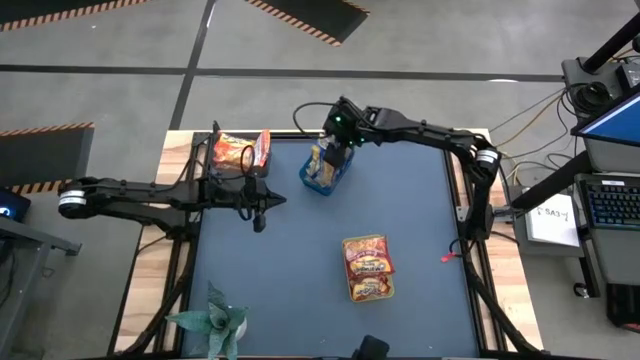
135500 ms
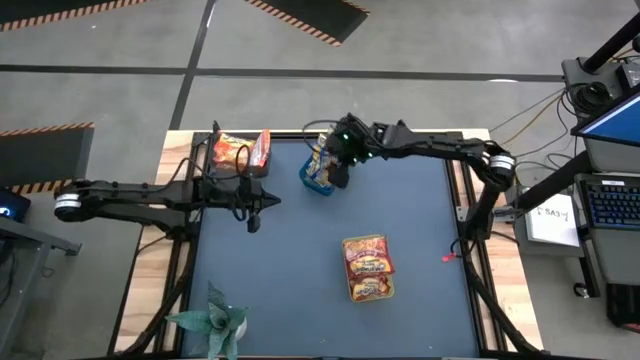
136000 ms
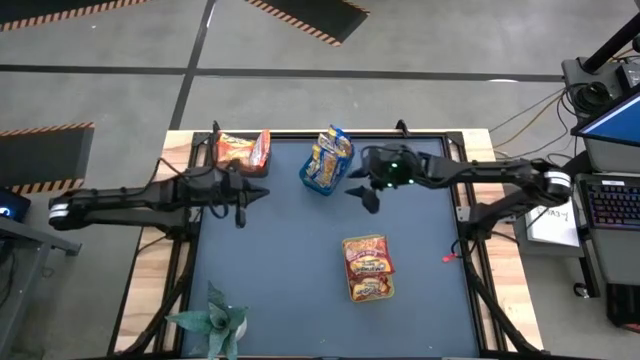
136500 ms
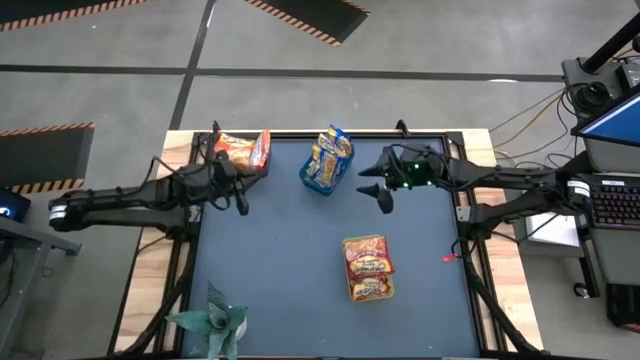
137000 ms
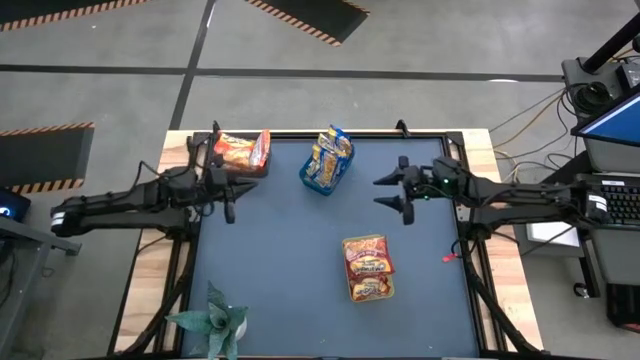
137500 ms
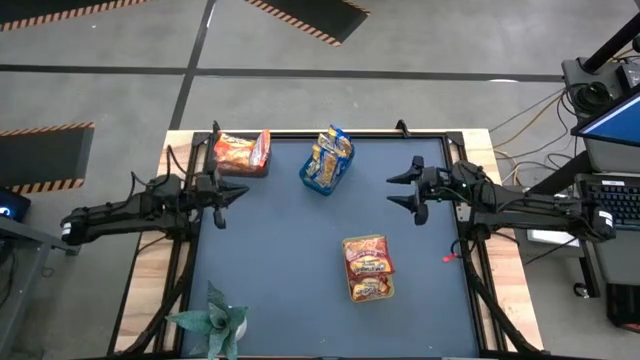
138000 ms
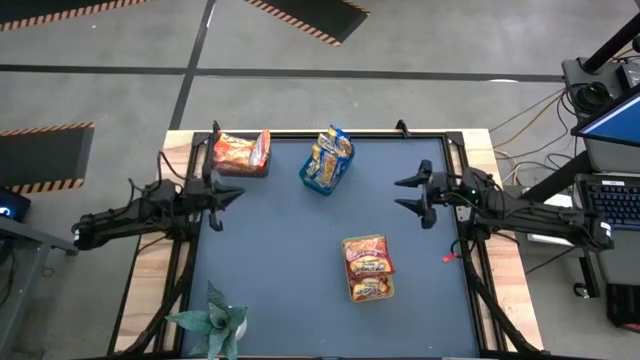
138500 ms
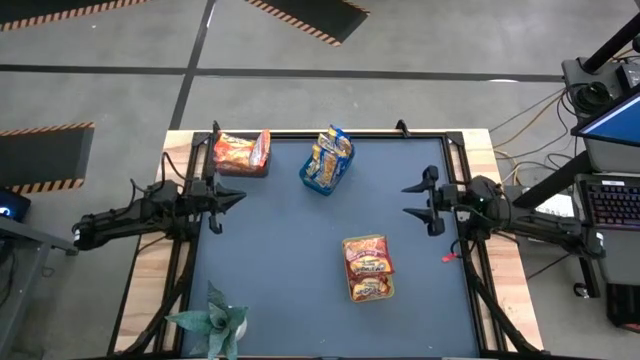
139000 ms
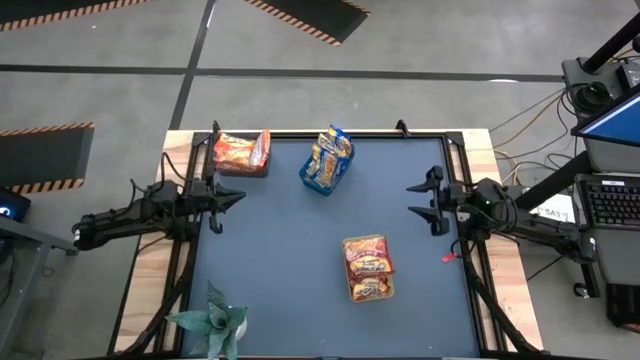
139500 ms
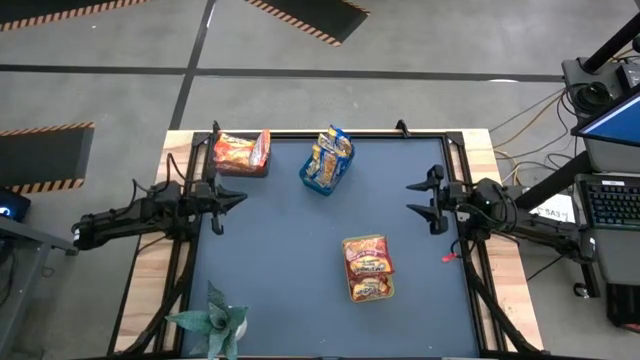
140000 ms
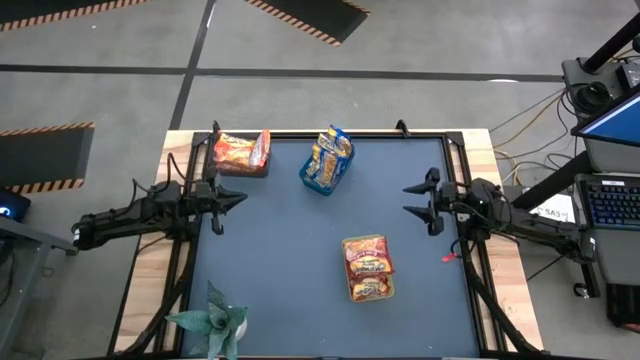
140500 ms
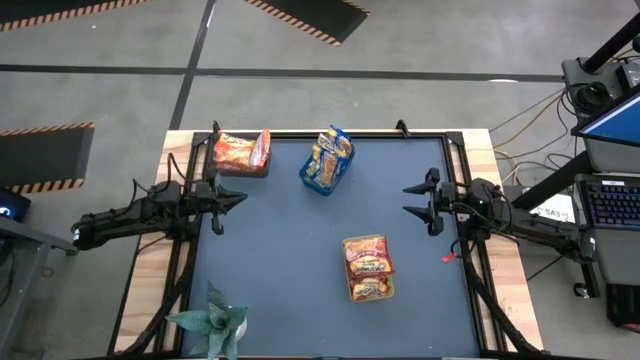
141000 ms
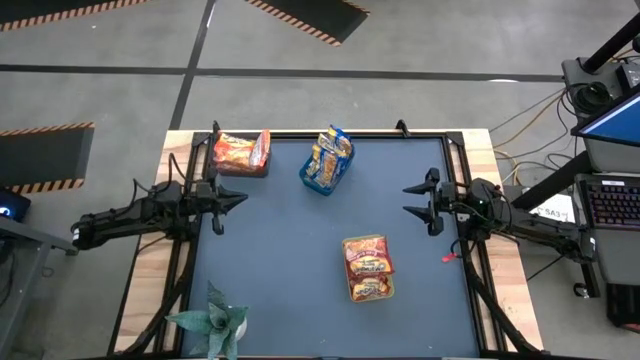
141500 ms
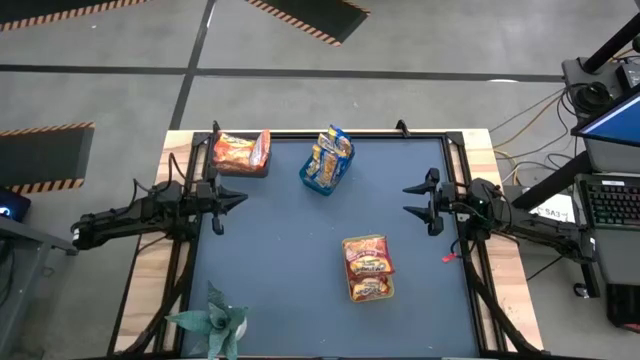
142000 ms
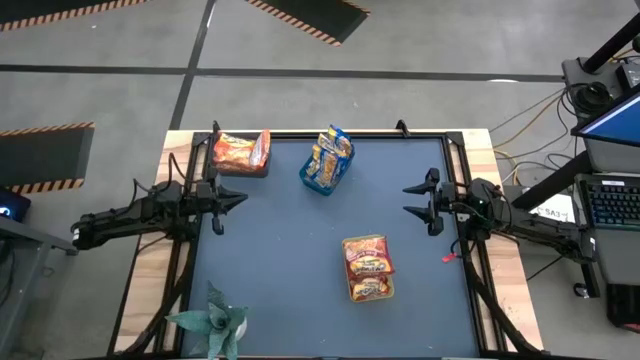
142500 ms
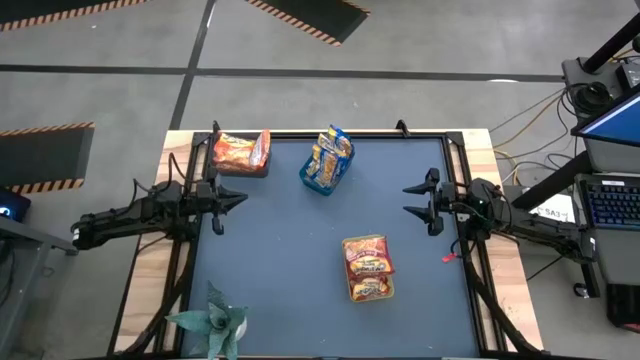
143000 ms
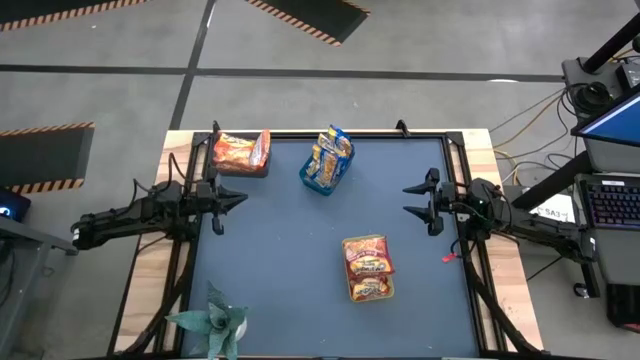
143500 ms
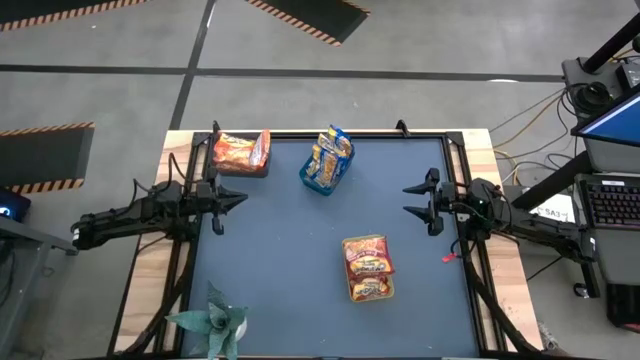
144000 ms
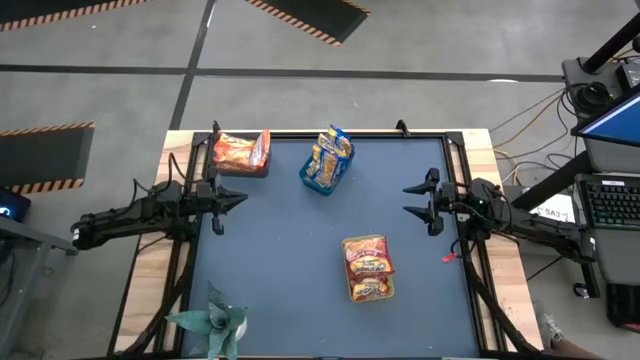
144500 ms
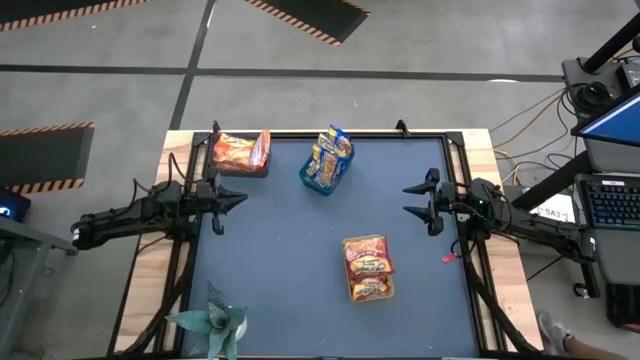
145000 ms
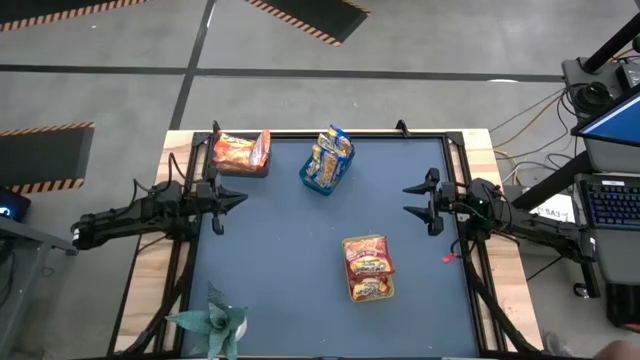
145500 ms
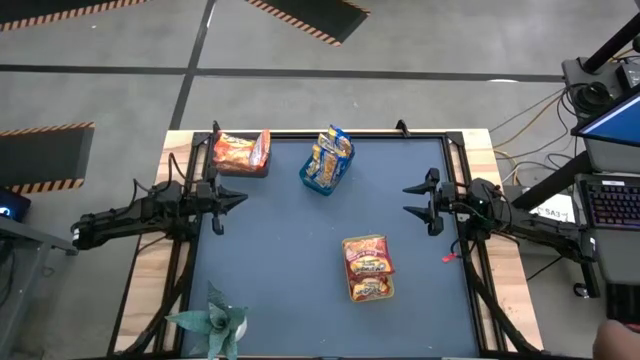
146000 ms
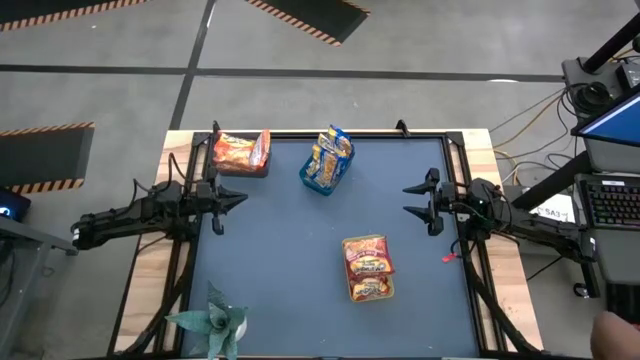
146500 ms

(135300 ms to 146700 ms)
Task: Sort Maruchan noodles
Return to Home Position

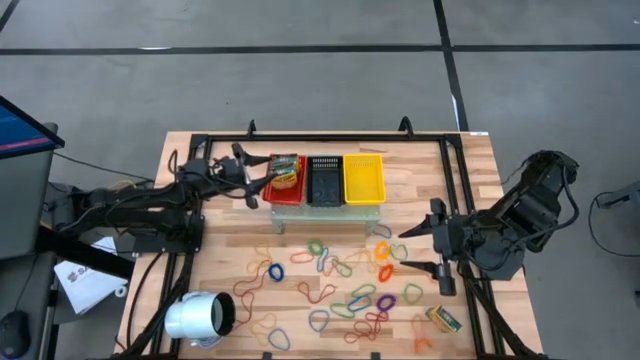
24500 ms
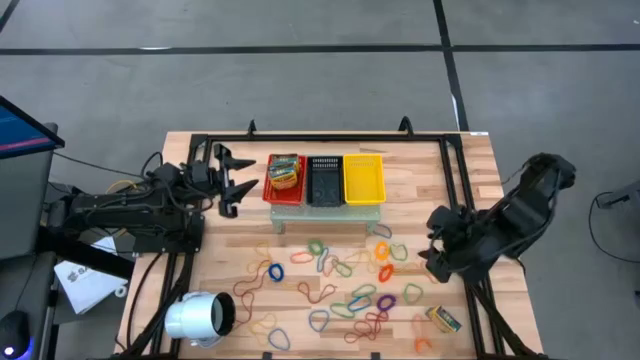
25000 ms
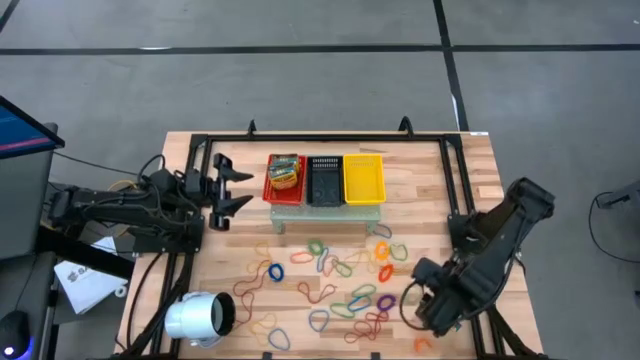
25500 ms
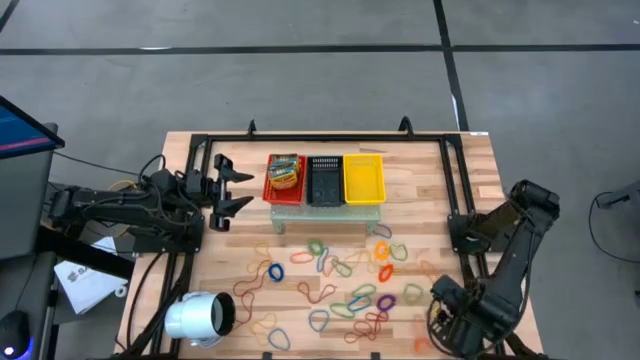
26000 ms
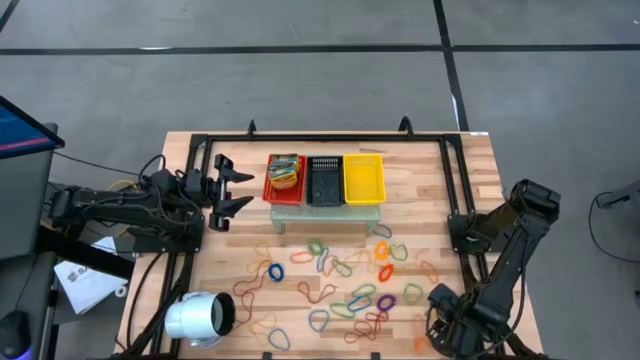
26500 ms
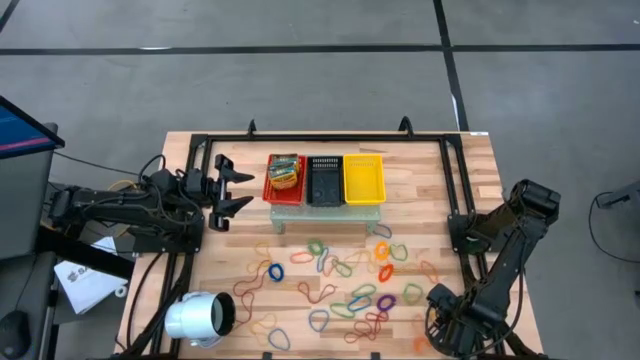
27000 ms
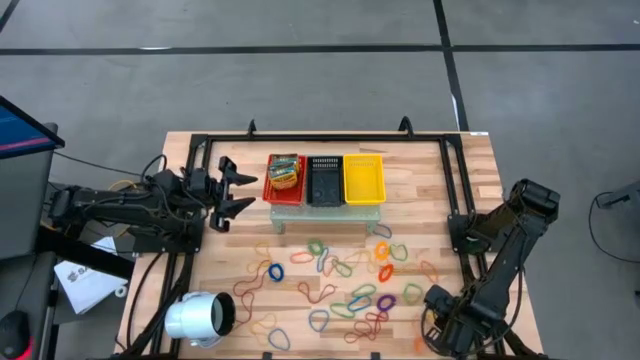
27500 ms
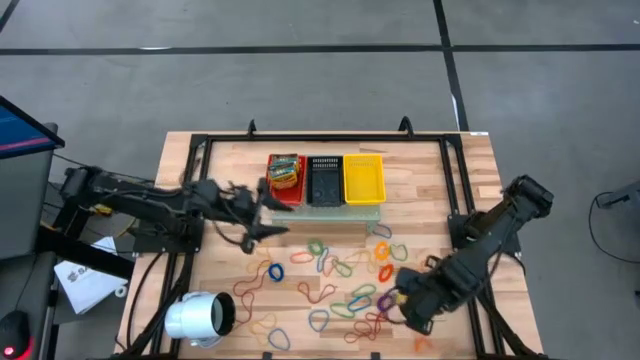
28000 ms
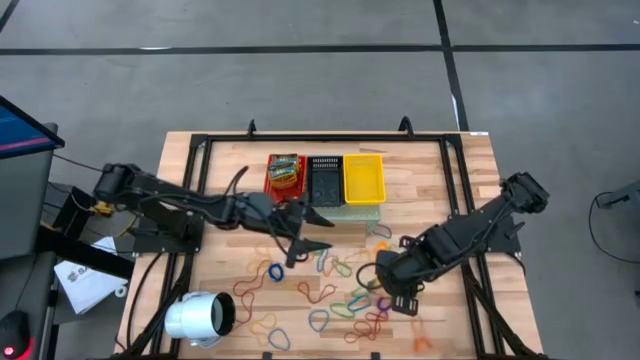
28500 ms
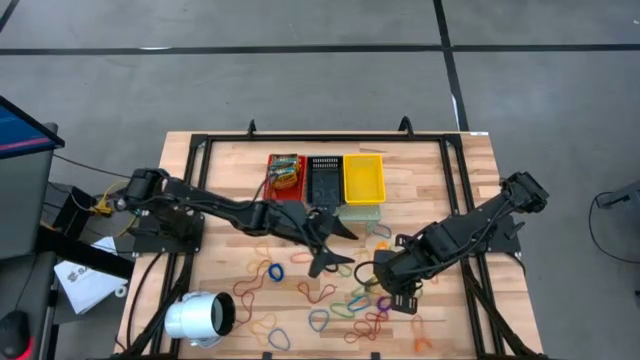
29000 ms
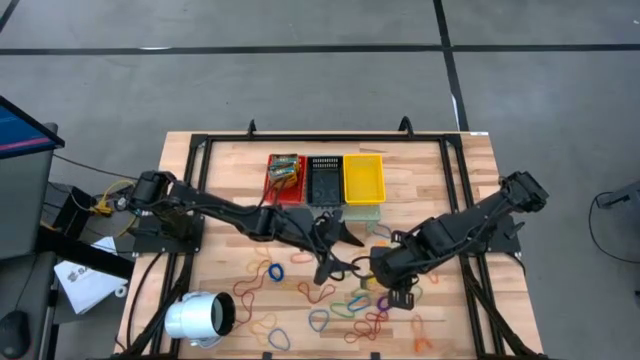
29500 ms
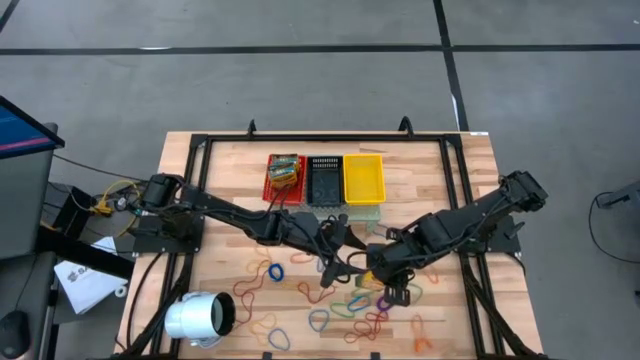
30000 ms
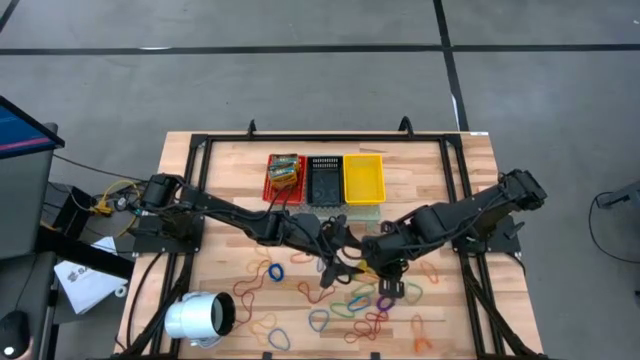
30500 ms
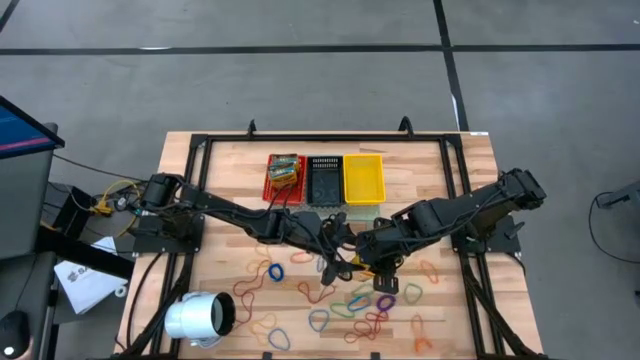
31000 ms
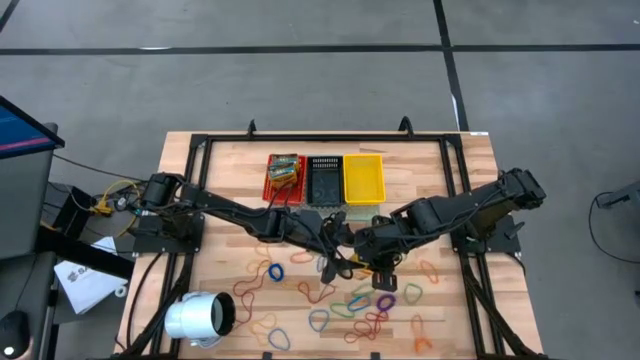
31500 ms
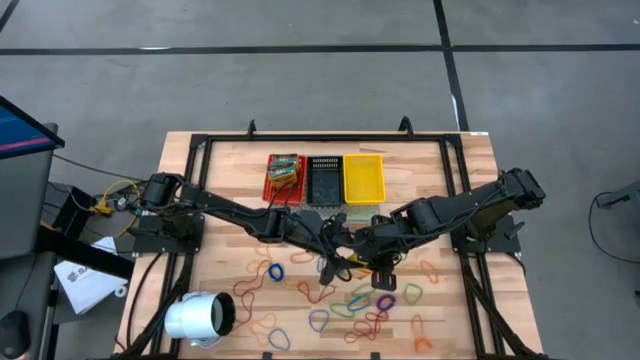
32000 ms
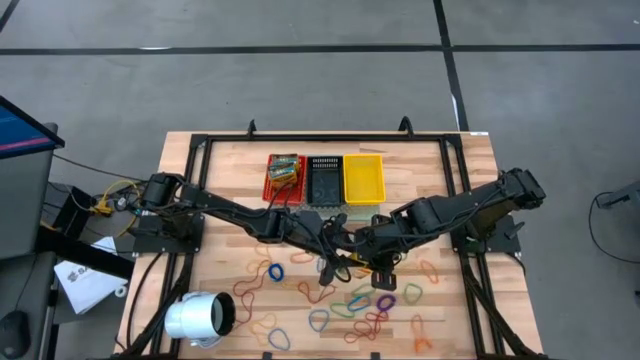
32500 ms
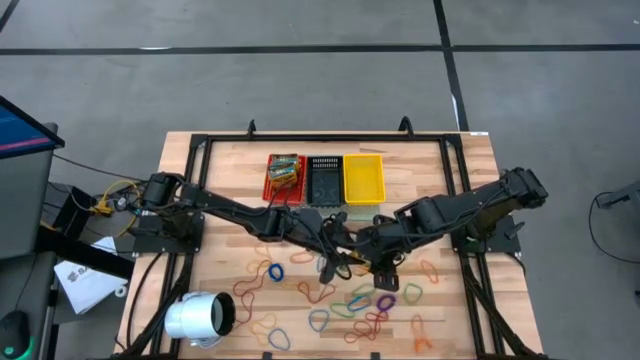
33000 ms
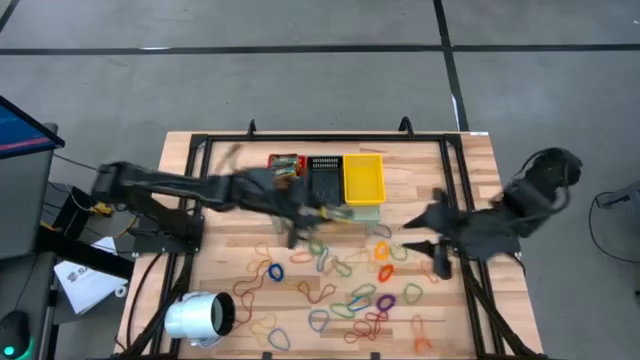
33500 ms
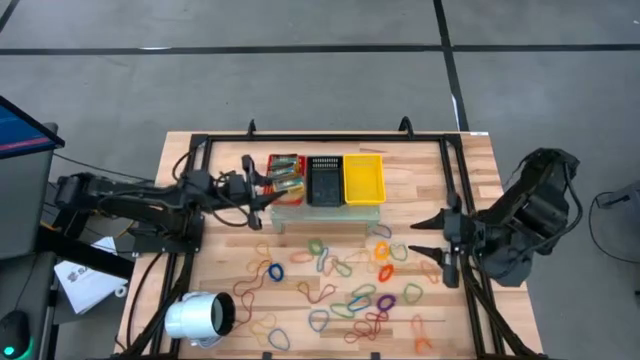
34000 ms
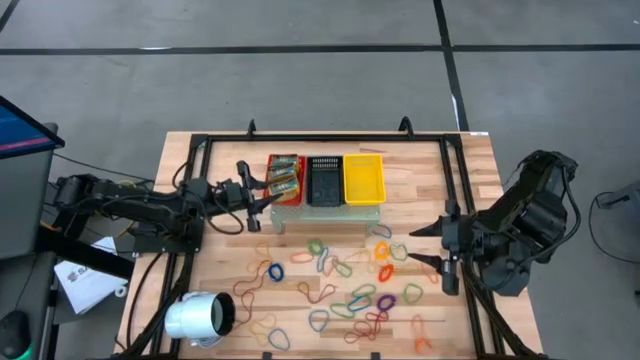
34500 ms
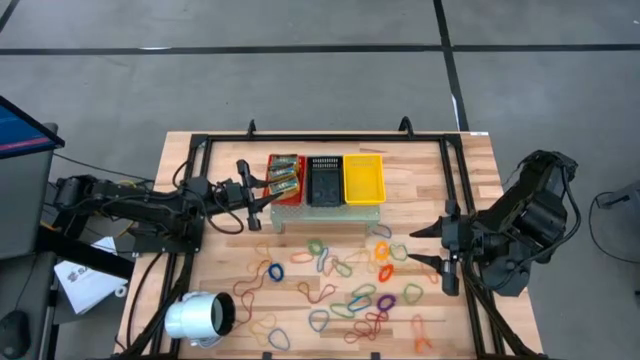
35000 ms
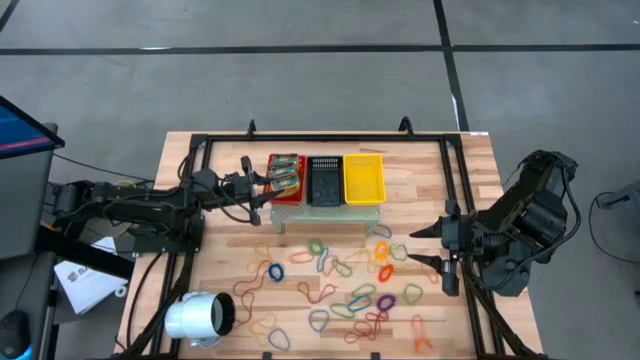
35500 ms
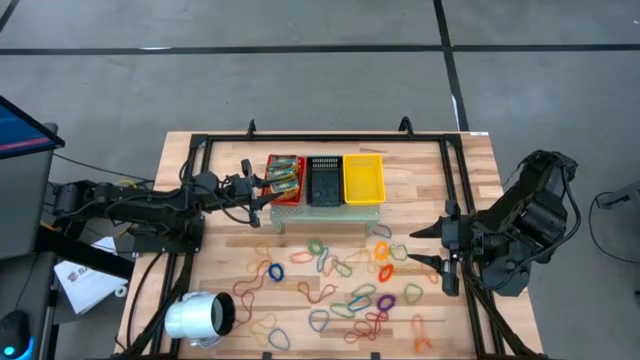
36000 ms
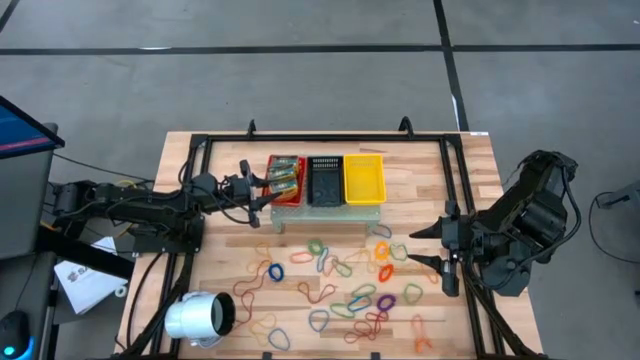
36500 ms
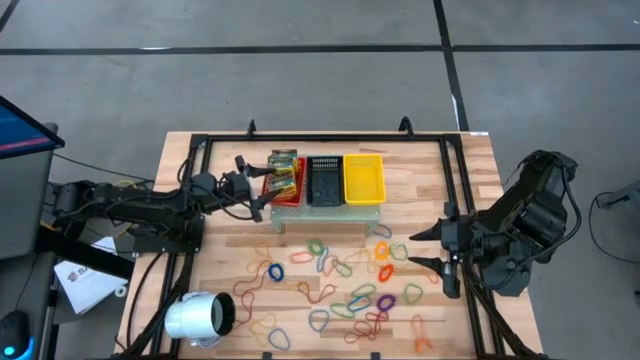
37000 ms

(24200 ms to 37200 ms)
Task: Pick & Place Office Desk Supplies
Put the crayon box into the red bin on the shelf
